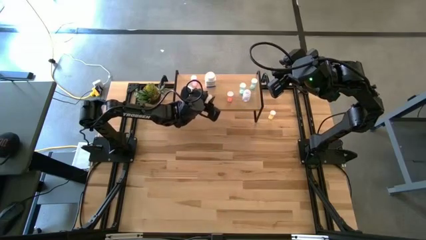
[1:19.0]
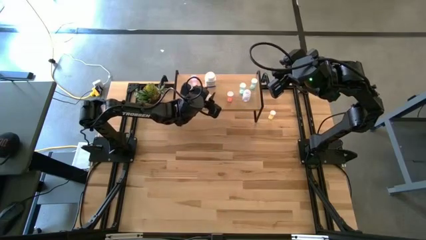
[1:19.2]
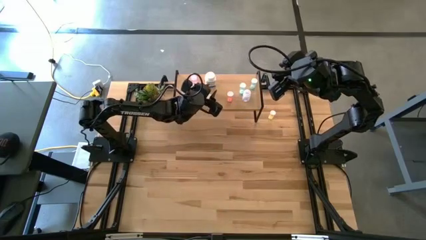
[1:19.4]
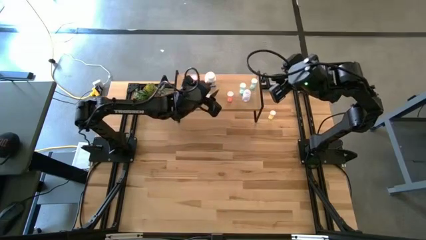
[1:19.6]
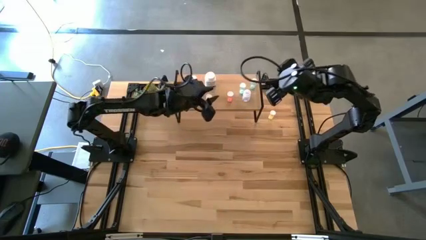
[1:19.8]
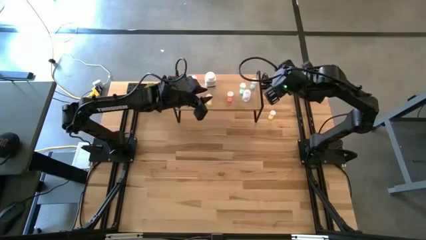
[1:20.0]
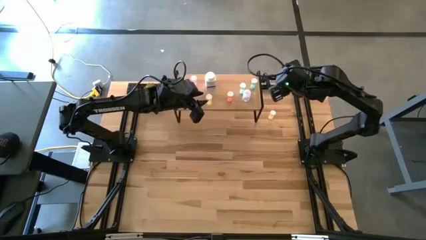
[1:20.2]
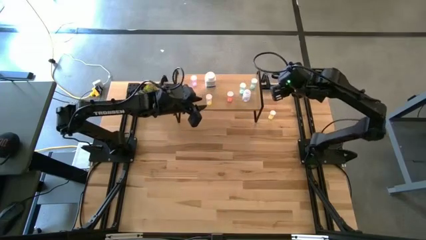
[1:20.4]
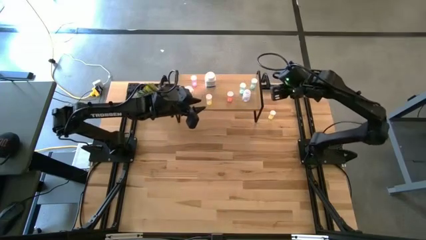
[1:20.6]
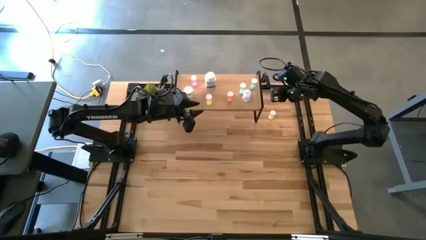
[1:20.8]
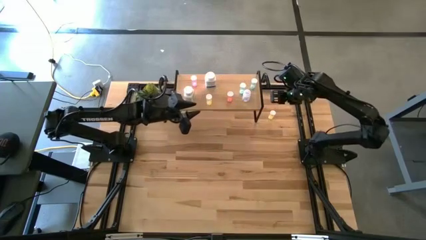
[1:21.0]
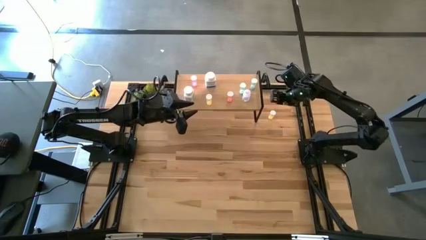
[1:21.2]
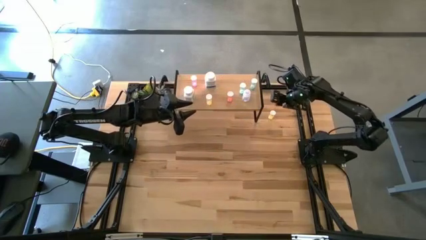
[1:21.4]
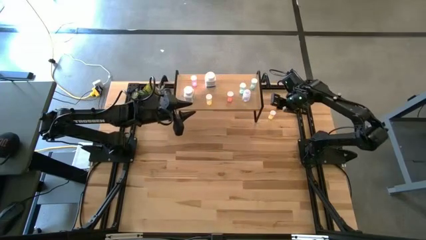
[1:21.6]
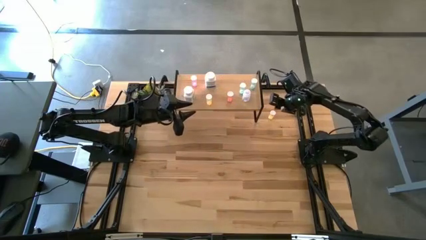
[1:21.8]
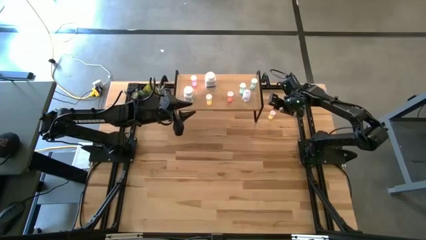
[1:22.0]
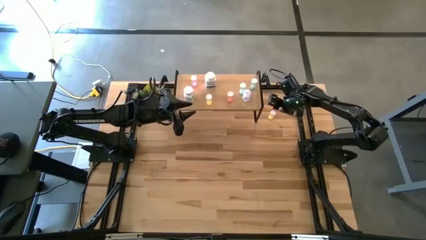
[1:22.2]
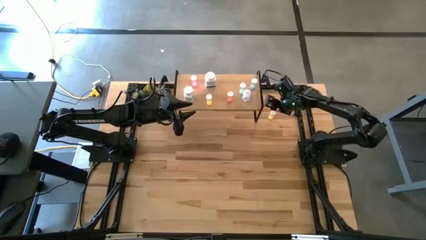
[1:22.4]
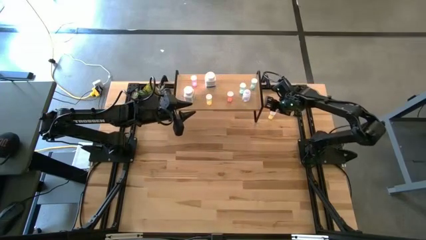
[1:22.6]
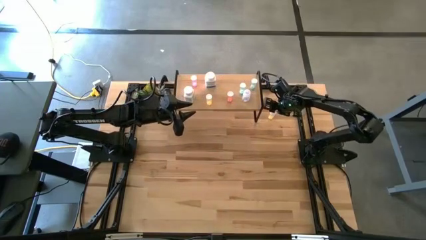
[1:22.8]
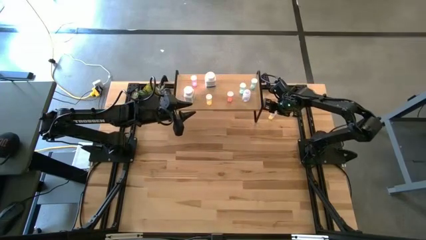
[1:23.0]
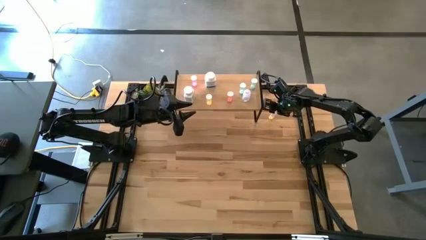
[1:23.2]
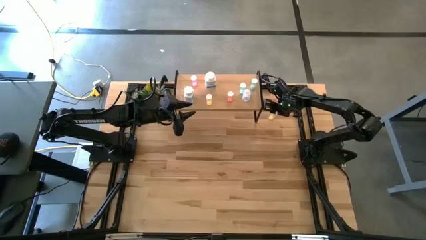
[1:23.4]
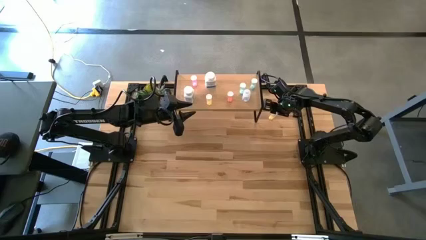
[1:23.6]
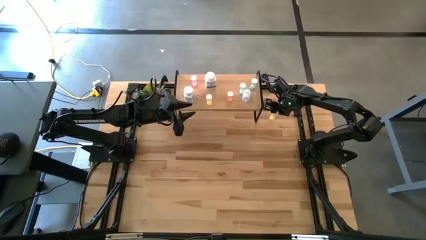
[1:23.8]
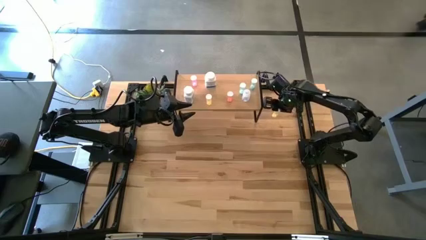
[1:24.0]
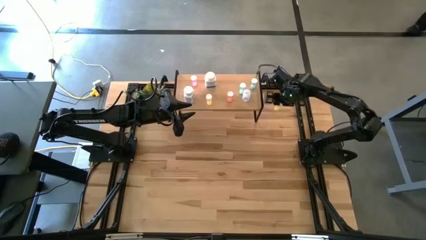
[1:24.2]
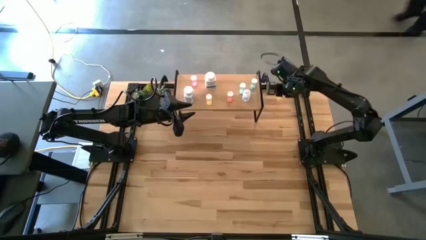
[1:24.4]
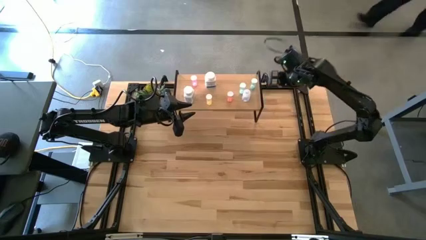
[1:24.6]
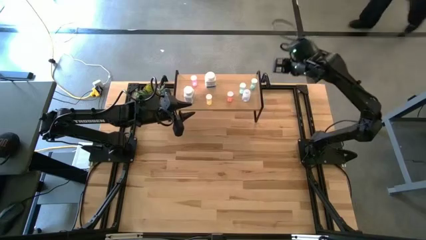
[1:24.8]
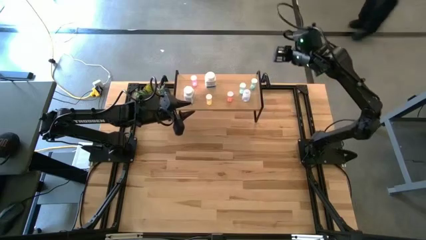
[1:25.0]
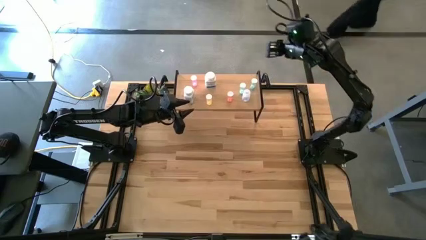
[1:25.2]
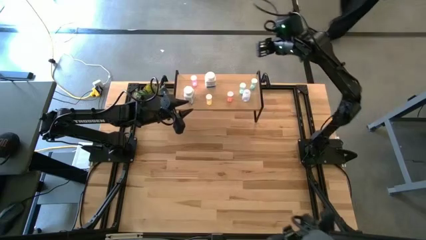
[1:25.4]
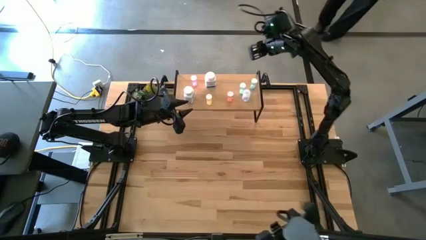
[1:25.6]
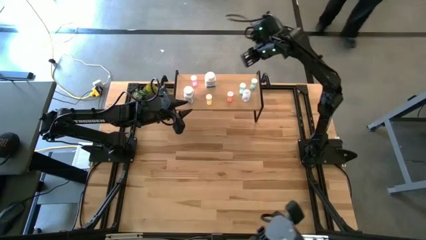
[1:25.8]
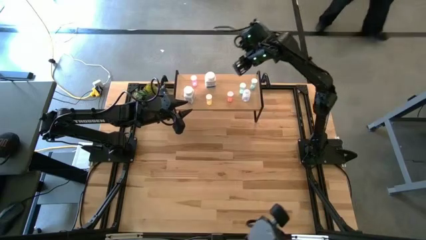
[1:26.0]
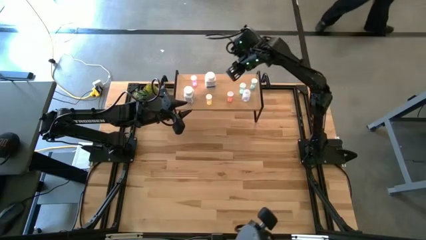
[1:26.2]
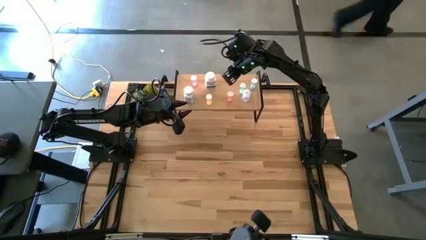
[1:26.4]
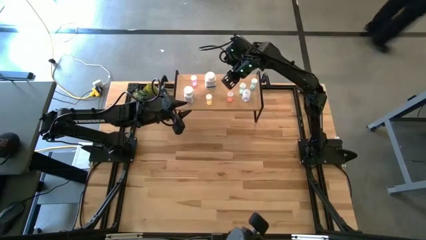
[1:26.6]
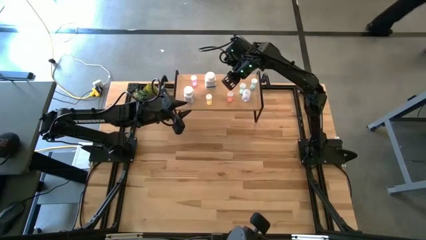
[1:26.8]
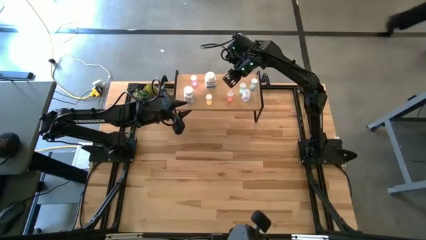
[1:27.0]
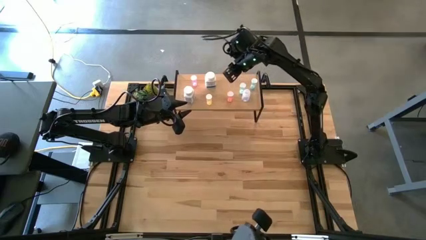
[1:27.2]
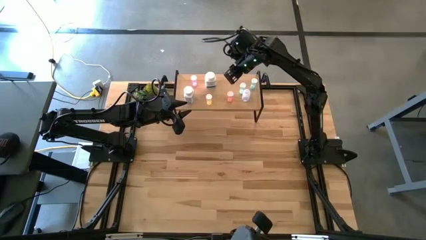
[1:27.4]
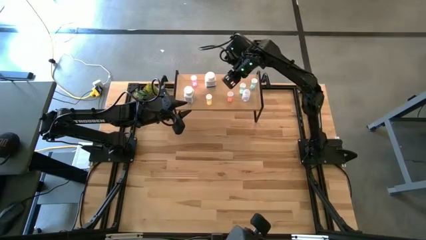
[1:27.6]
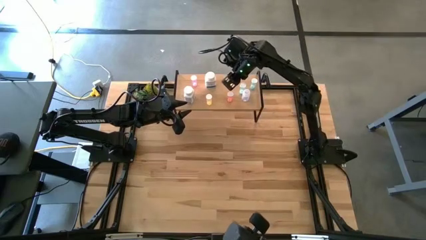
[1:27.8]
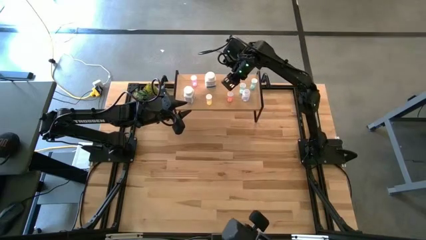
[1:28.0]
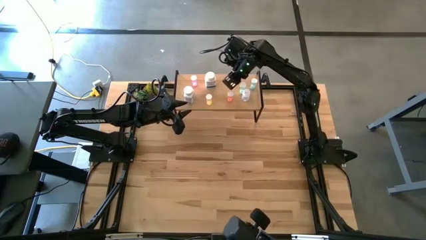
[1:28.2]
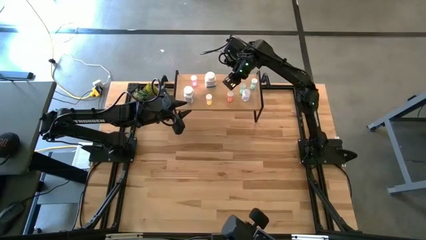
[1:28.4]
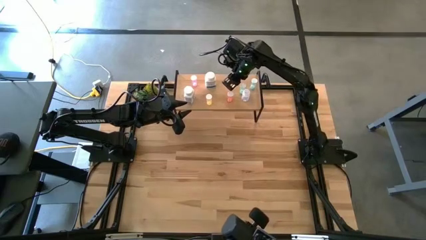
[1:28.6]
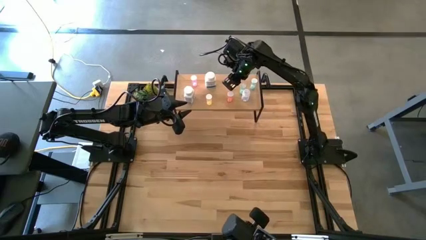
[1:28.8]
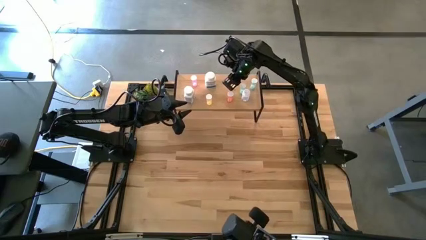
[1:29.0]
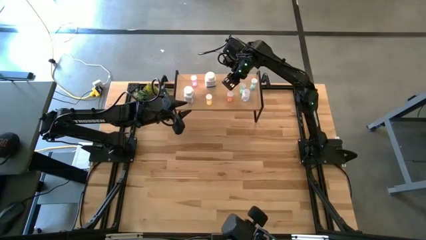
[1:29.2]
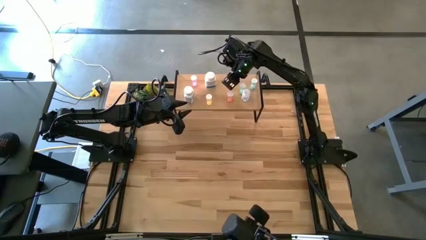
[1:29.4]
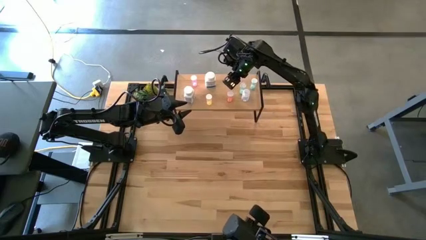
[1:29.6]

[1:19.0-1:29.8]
Task: Pick and place medicine bottles onto shelf by color
Put the yellow pill bottle on the shelf

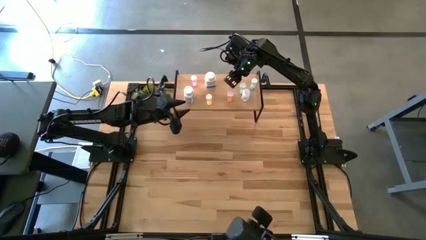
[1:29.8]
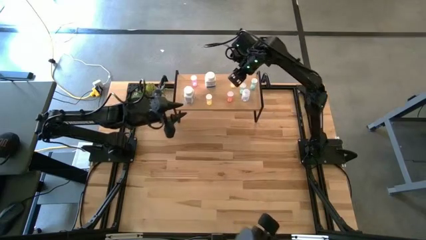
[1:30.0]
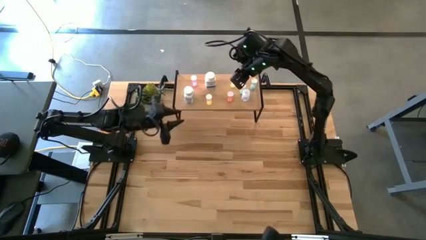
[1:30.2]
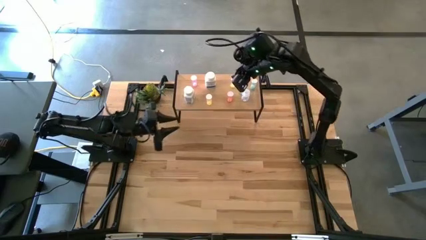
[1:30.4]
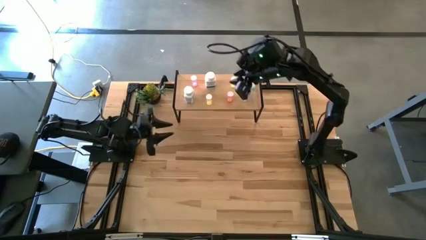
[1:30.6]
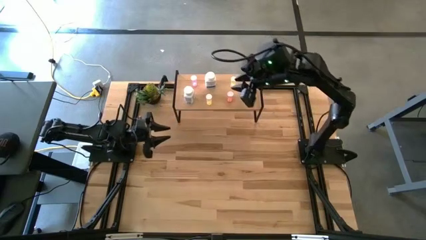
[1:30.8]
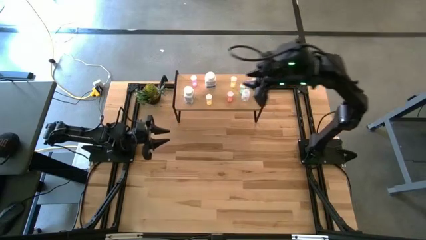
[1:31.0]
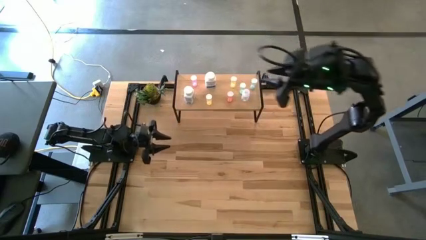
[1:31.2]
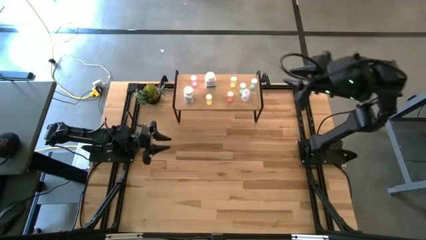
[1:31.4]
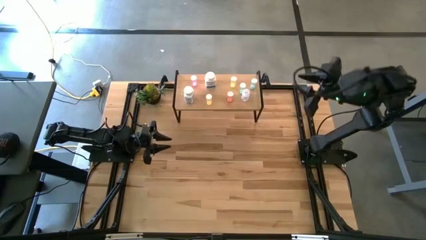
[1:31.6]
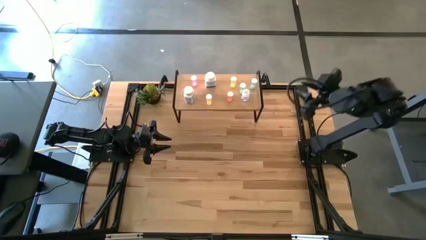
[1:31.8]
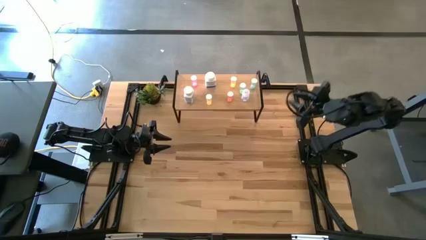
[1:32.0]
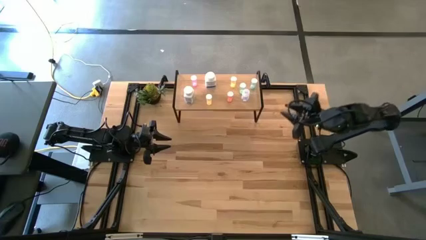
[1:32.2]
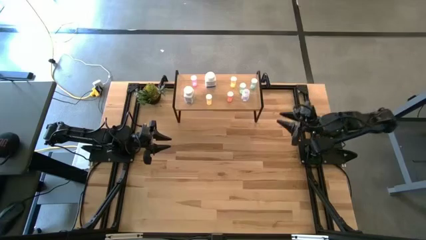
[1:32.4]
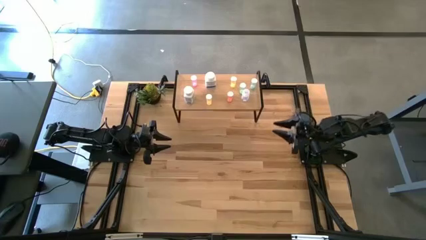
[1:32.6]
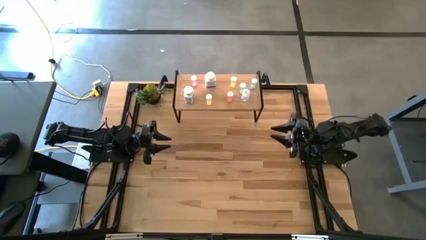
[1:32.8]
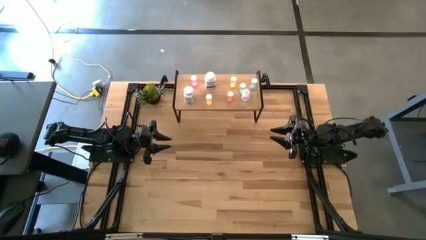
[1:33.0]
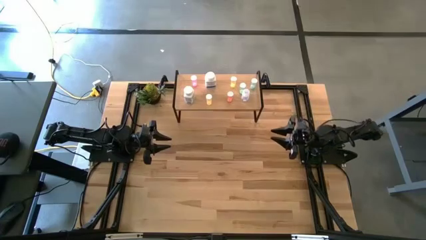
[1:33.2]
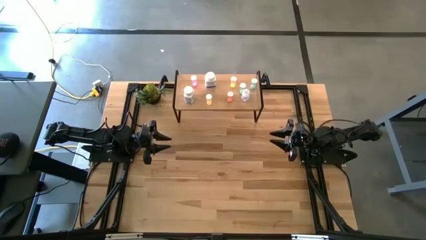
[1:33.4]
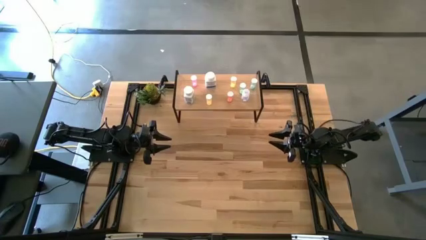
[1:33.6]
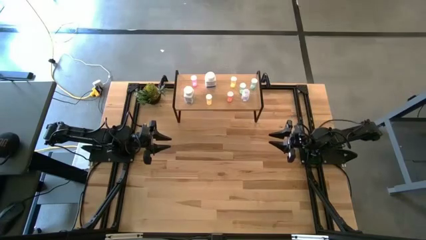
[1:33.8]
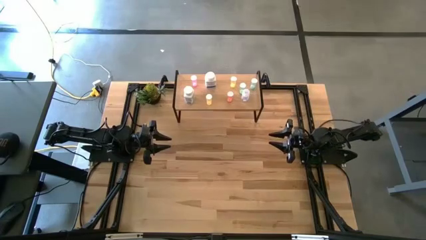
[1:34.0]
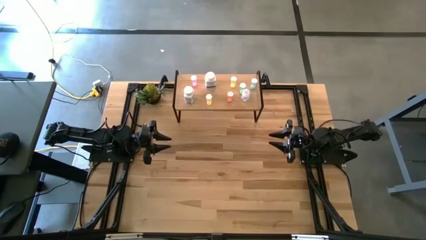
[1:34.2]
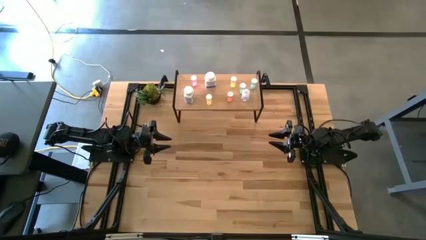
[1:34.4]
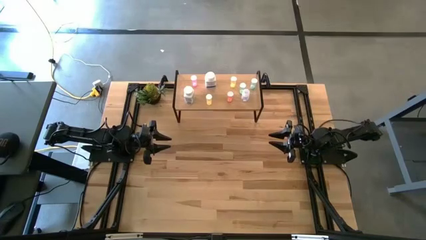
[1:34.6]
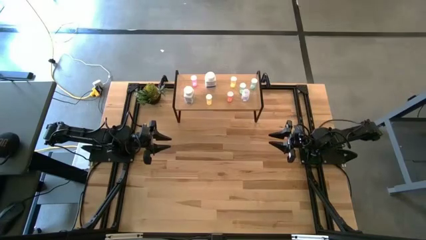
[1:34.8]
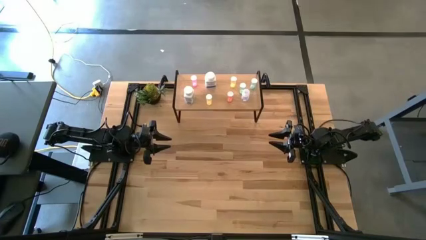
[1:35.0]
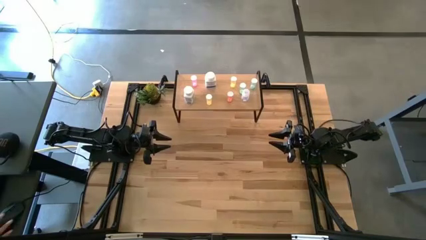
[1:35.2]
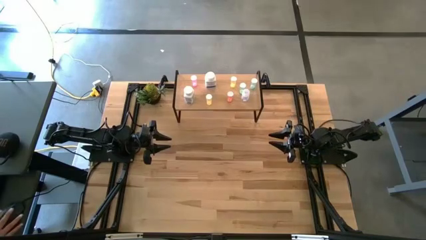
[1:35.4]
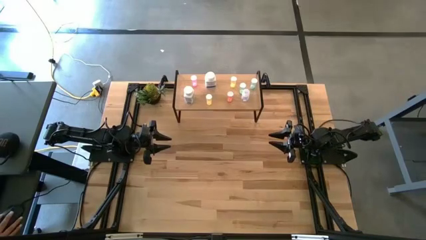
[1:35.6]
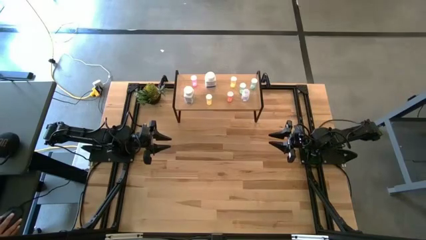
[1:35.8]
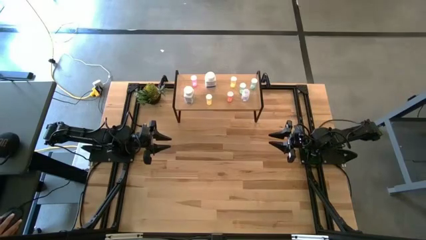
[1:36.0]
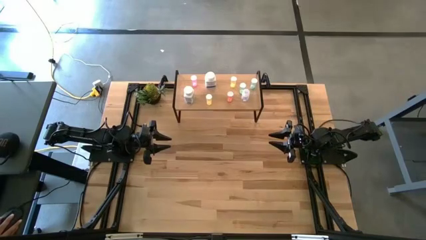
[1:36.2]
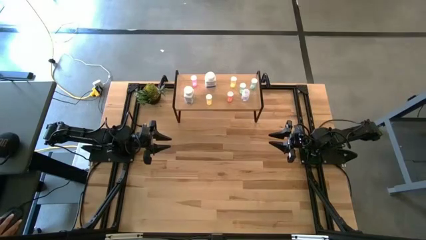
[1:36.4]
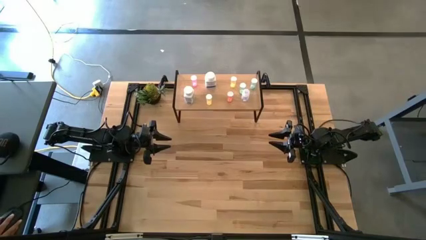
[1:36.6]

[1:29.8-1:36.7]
Return to Home Position
